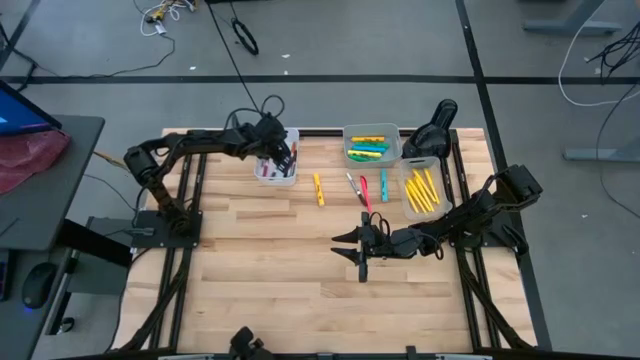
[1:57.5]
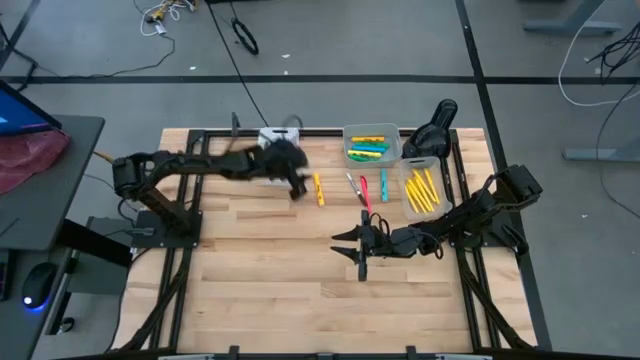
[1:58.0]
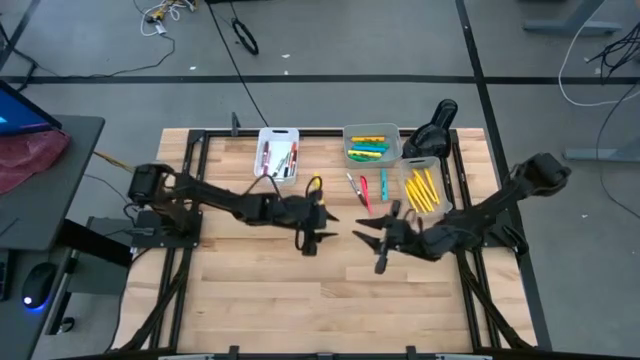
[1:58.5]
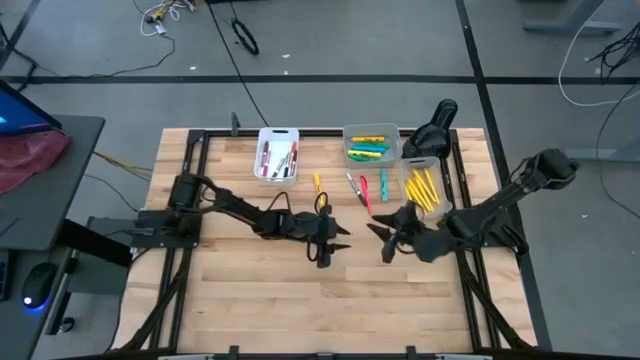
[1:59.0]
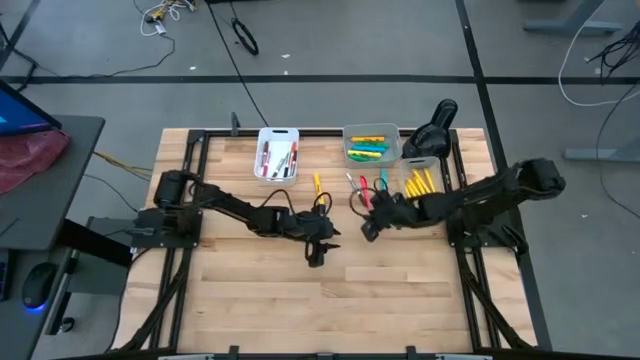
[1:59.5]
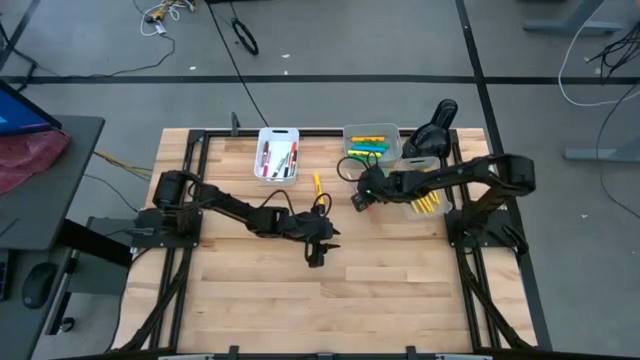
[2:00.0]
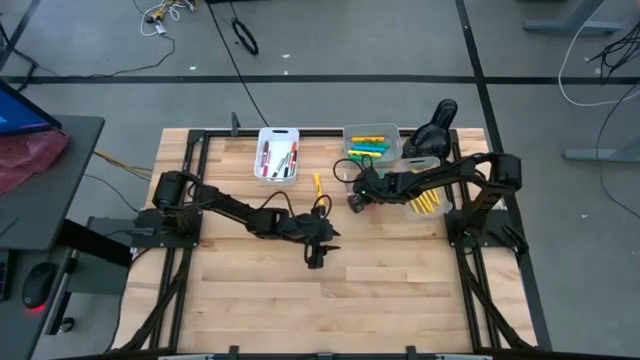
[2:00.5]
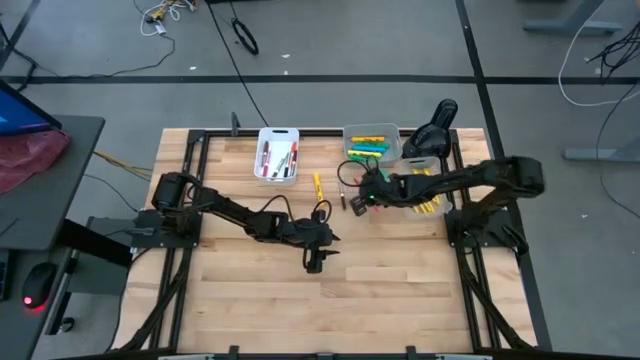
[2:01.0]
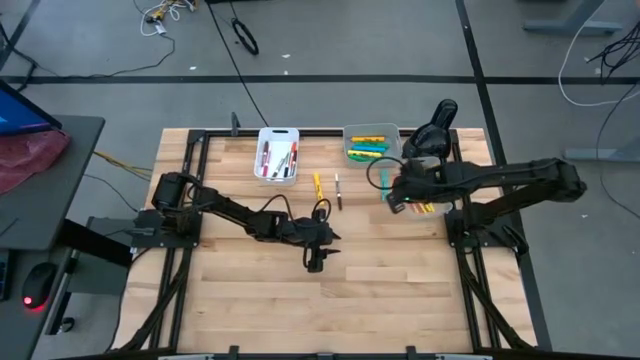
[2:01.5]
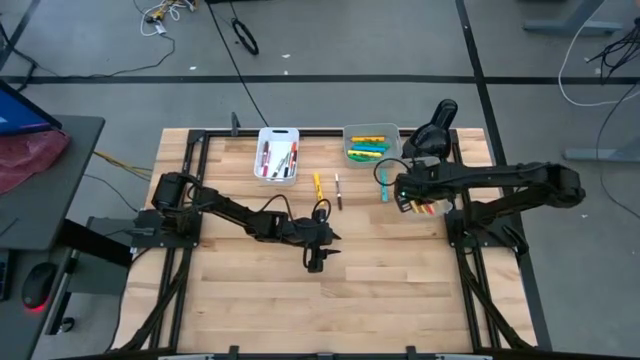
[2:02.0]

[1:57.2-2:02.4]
Task: Pick & Place Markers
Put the pink pen into the transparent bin

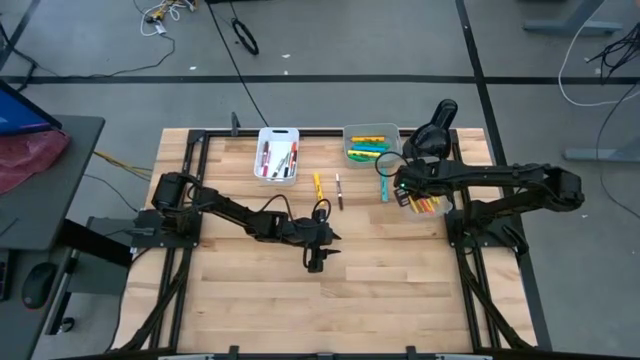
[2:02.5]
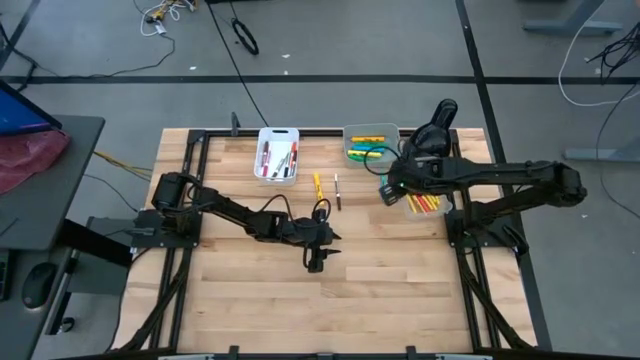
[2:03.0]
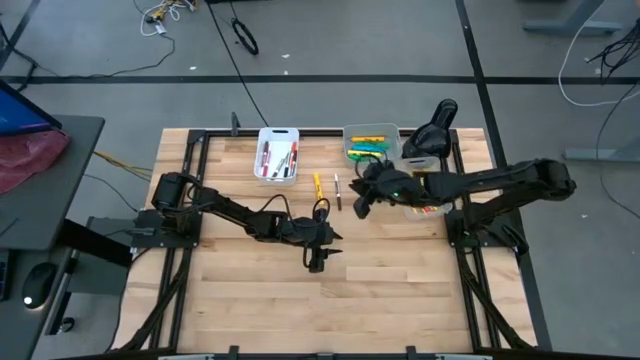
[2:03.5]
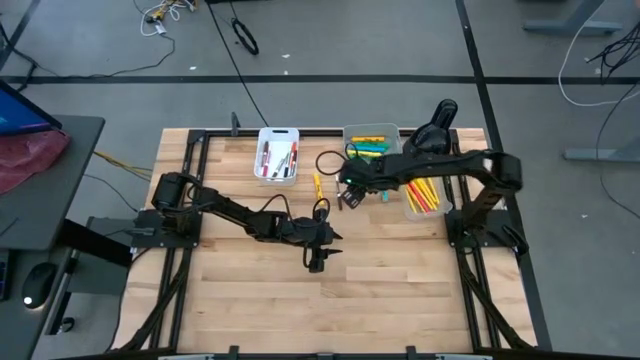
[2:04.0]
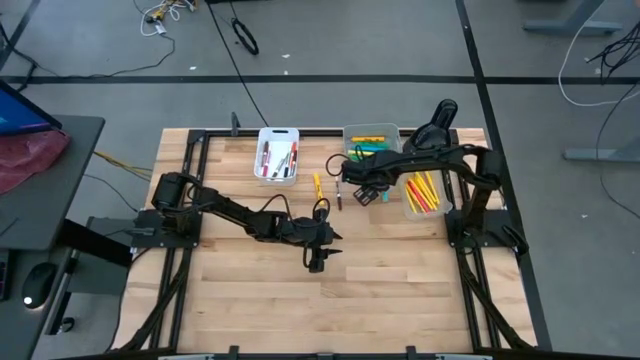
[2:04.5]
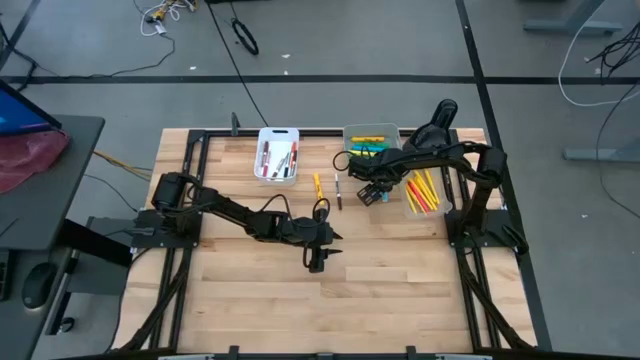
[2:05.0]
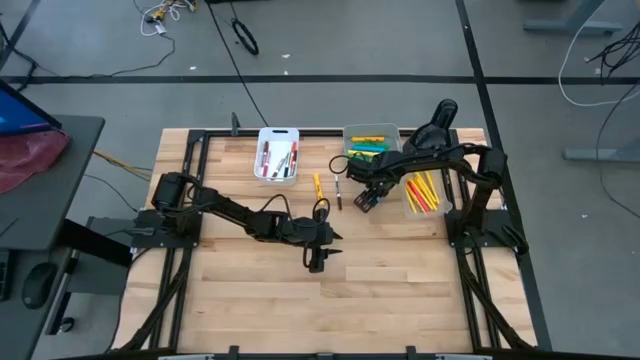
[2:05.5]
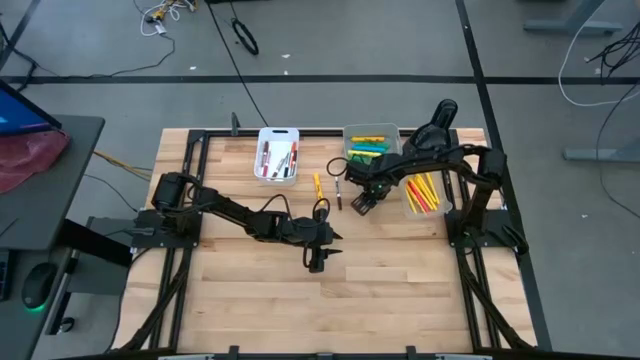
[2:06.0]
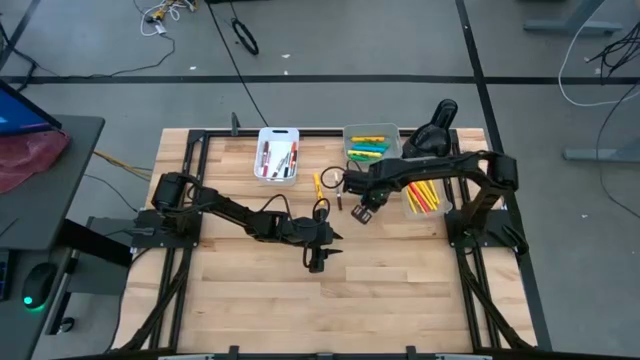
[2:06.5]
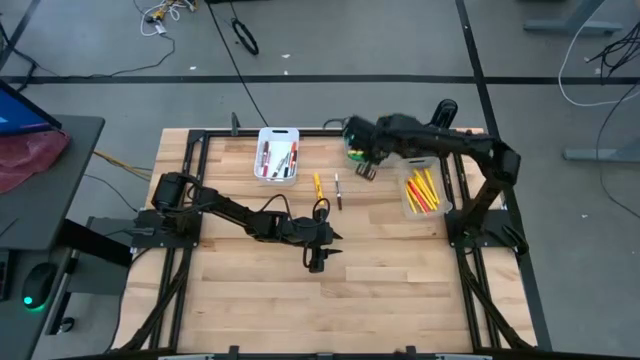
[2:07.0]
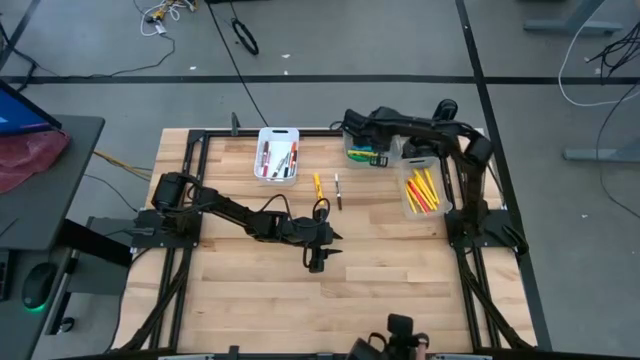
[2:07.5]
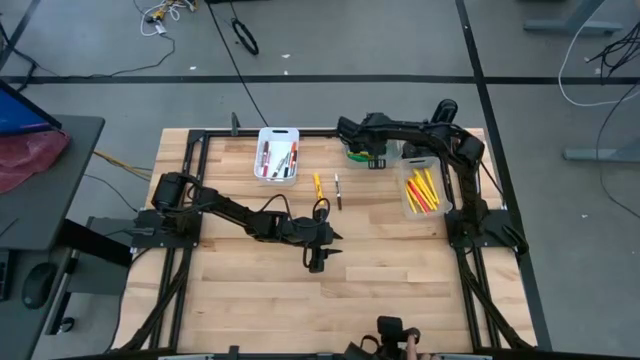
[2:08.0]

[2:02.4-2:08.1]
Put the light blue highlighter pen into the gray bin

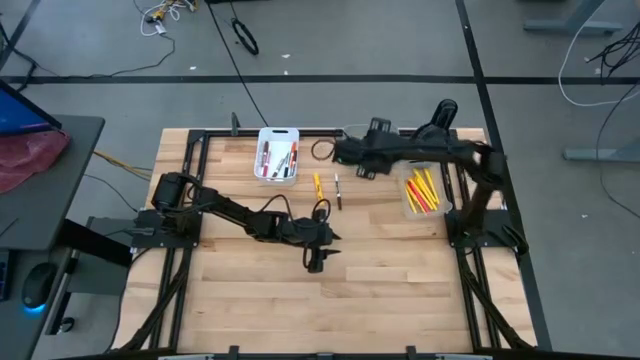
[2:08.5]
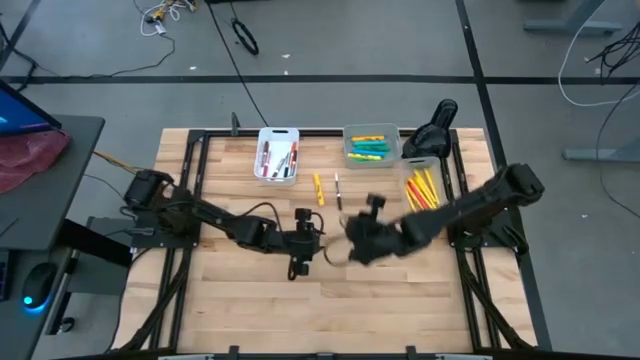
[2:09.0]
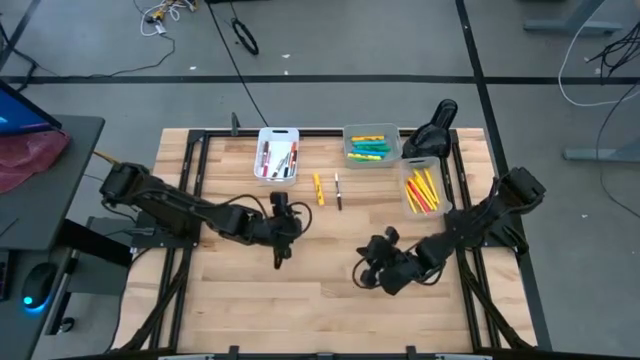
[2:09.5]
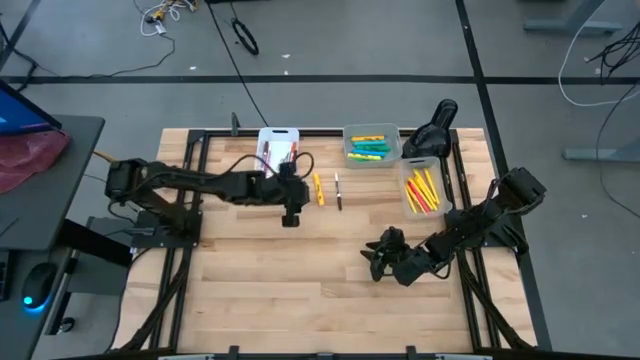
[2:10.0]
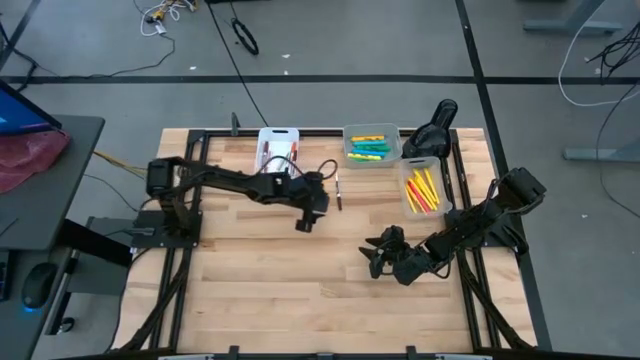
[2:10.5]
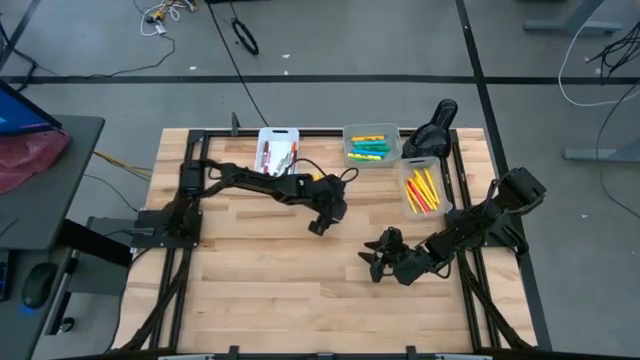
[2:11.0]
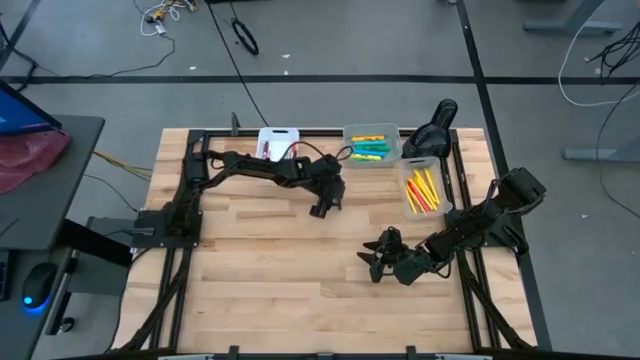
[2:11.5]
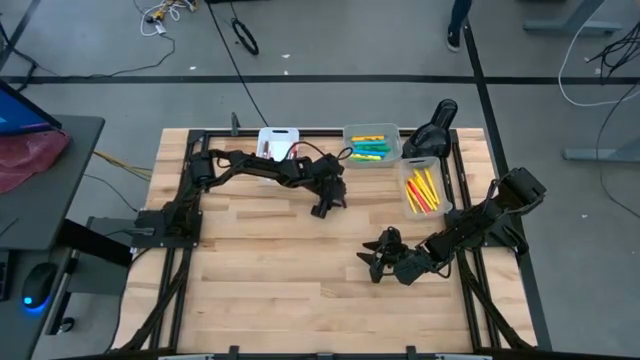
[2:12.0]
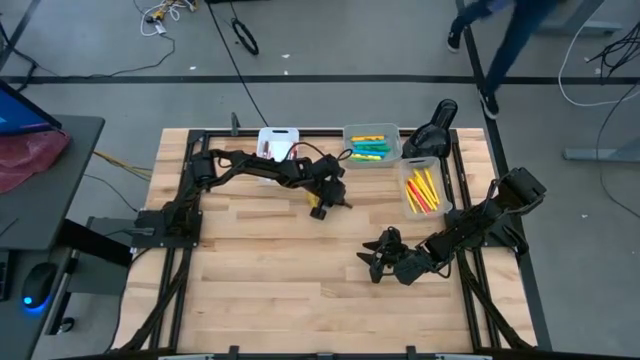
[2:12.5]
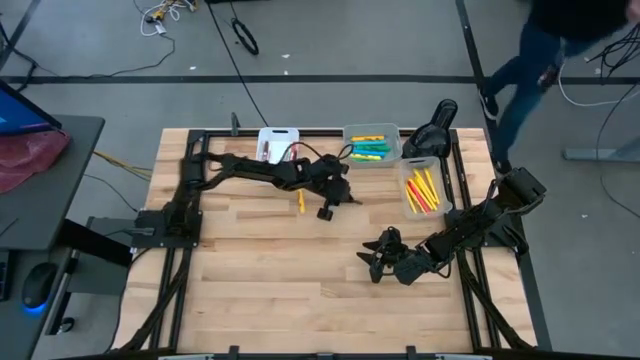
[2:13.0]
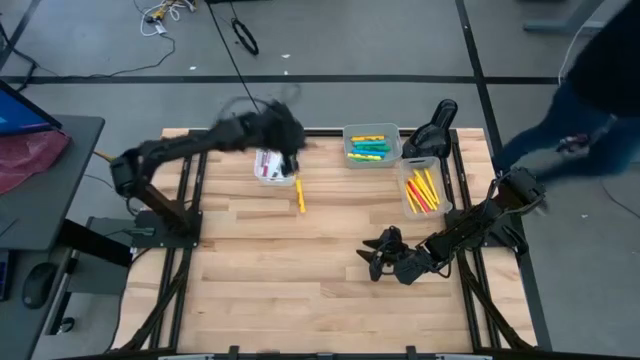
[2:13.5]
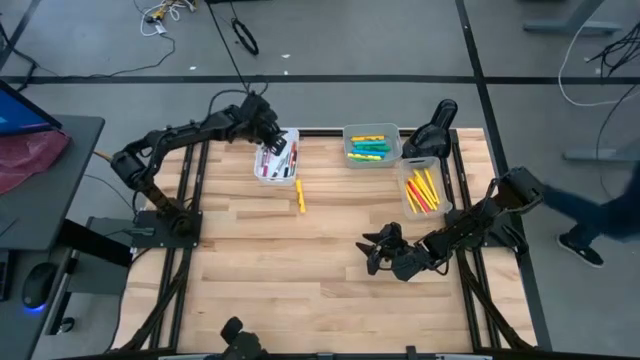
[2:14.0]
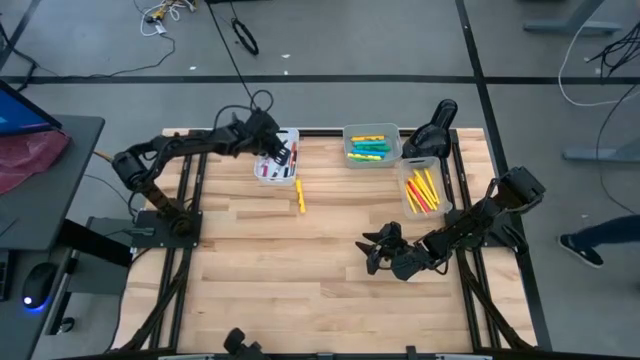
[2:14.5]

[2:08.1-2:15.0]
Put the brown marker pen into the white bin

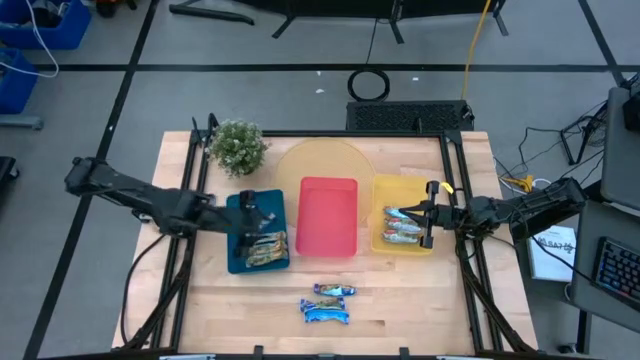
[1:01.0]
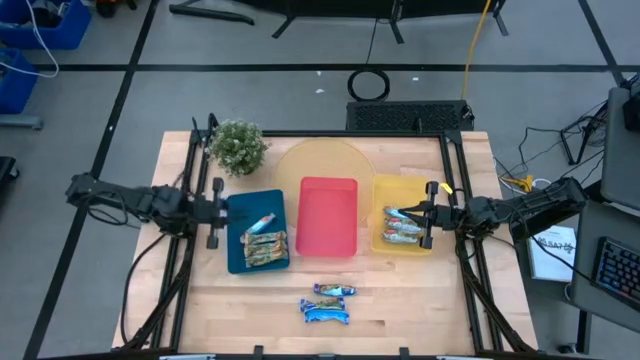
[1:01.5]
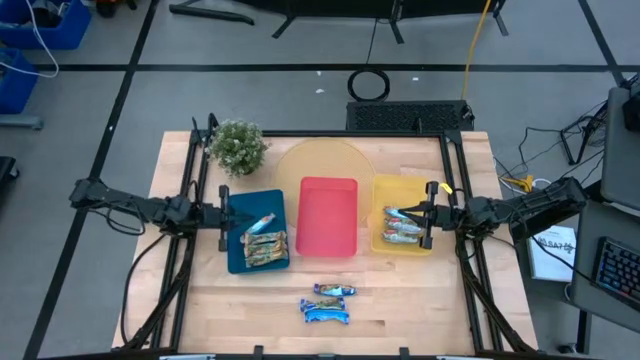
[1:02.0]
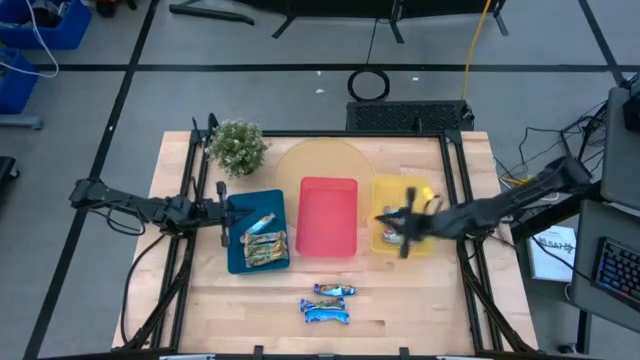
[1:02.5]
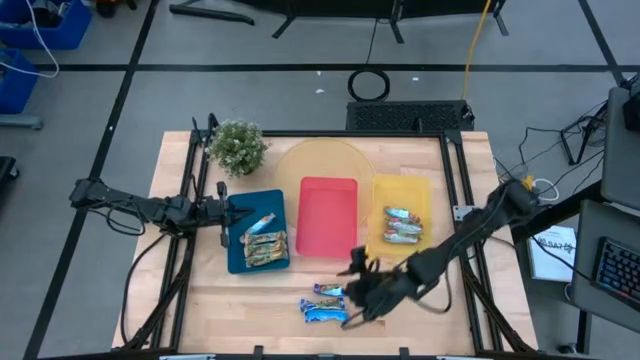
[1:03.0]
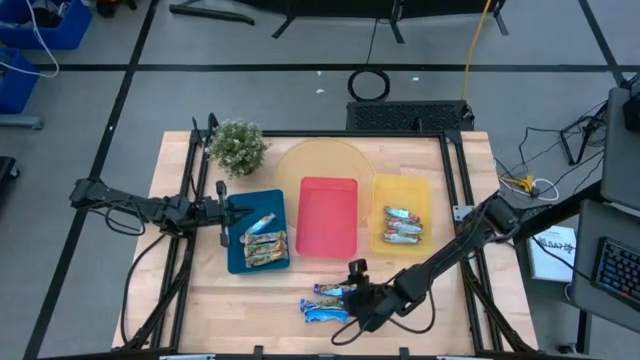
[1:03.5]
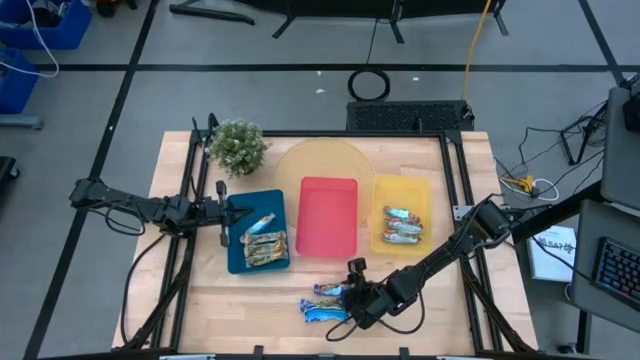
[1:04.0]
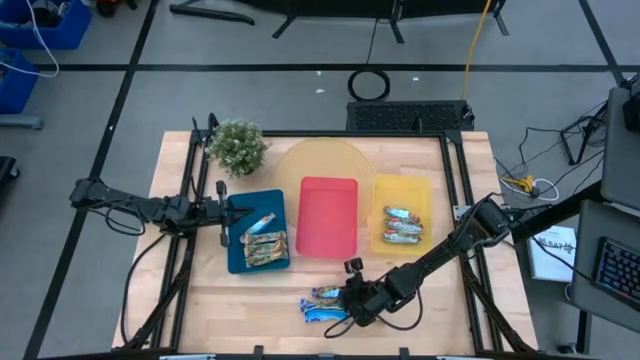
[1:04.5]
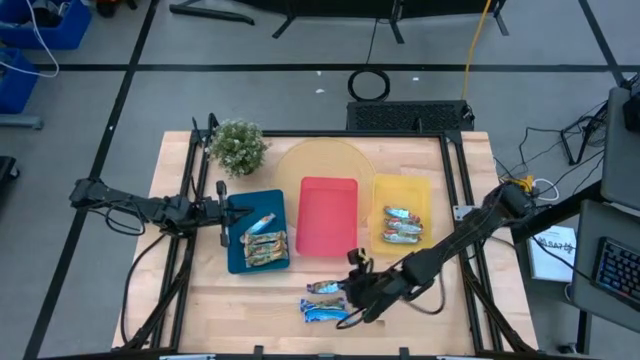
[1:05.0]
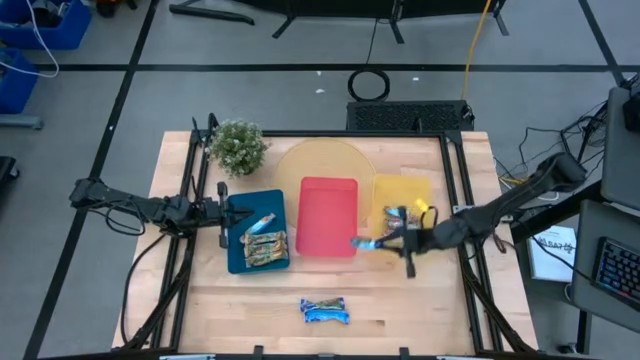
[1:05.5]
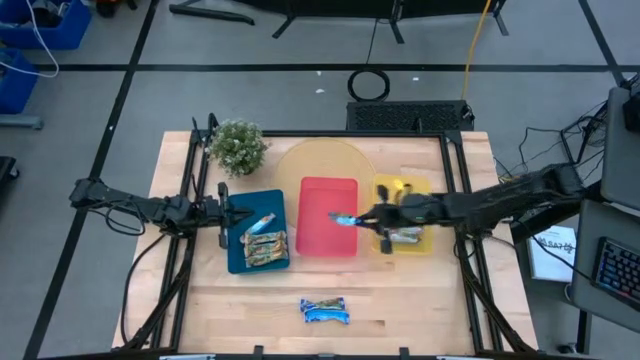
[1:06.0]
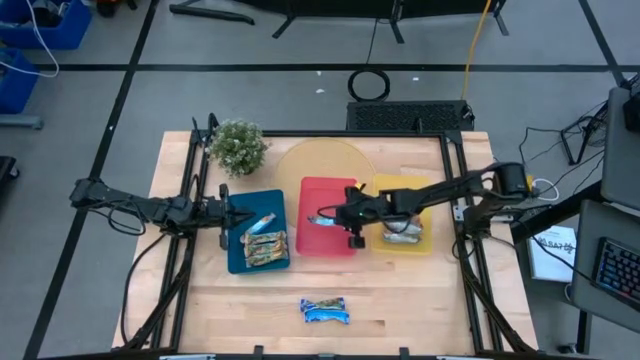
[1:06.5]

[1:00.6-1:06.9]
Task: Pick and place Granola Bars by type
Put the blue granola bar into the red bin
